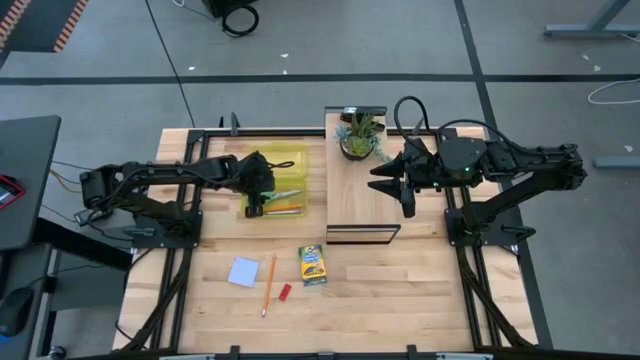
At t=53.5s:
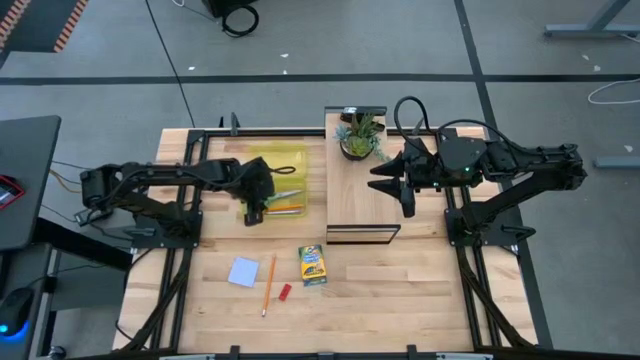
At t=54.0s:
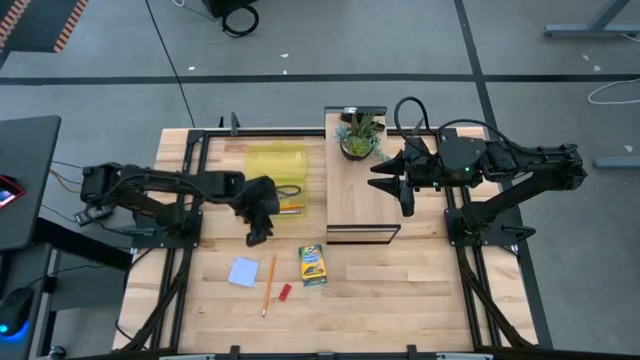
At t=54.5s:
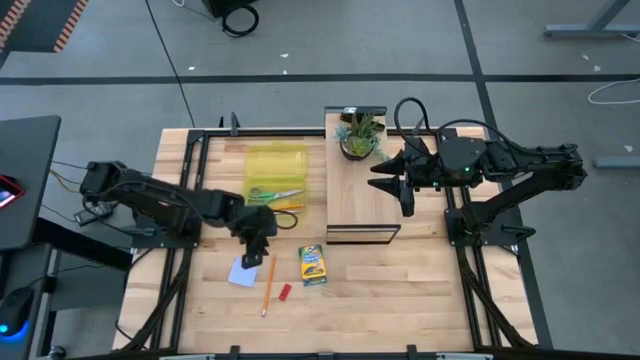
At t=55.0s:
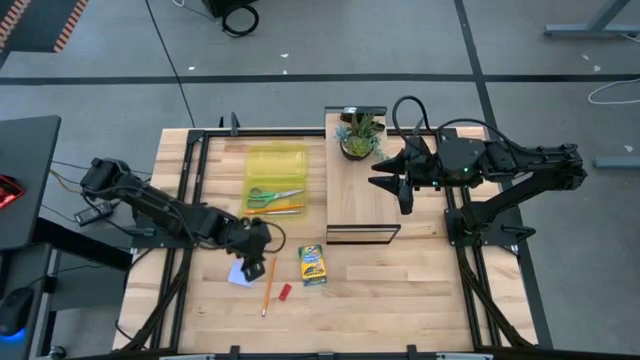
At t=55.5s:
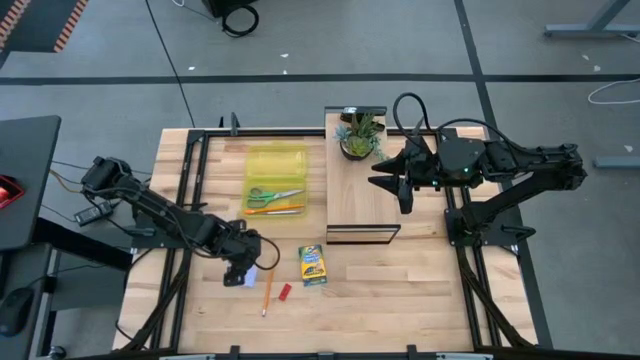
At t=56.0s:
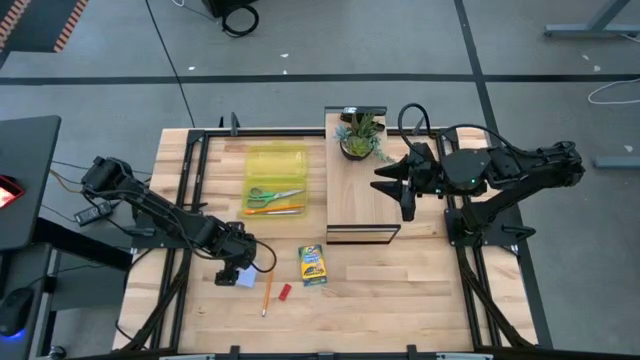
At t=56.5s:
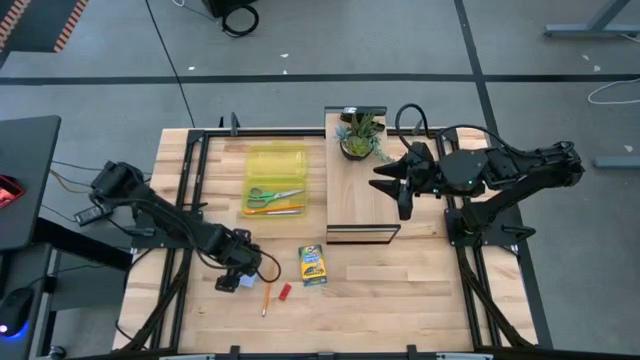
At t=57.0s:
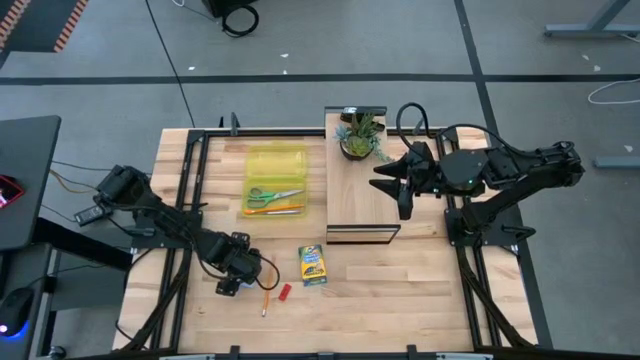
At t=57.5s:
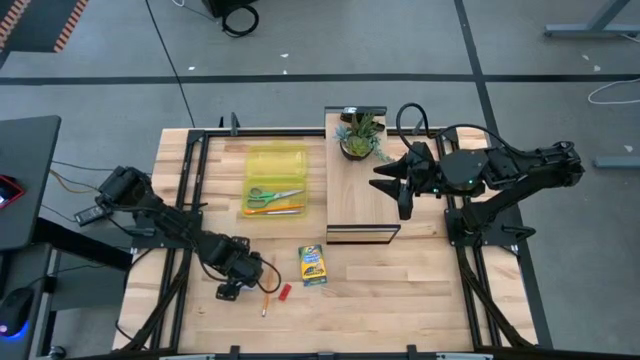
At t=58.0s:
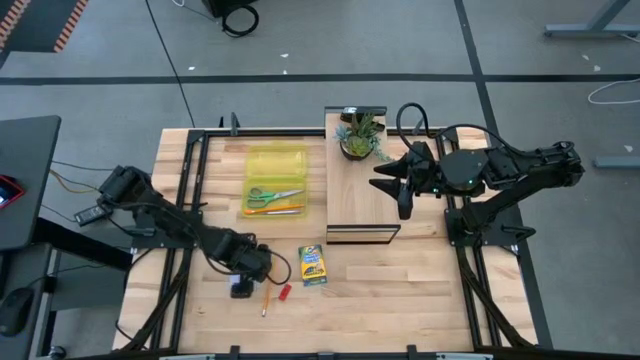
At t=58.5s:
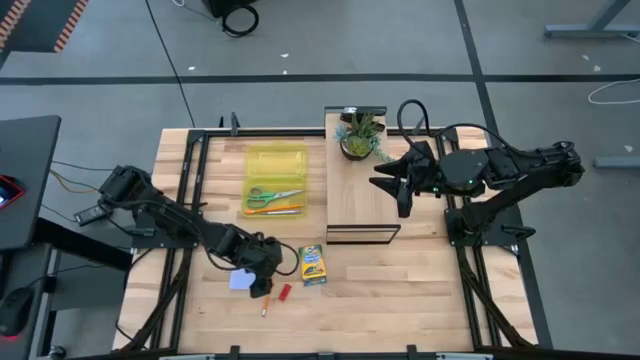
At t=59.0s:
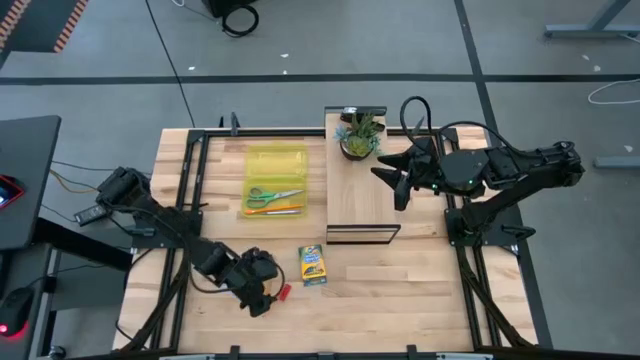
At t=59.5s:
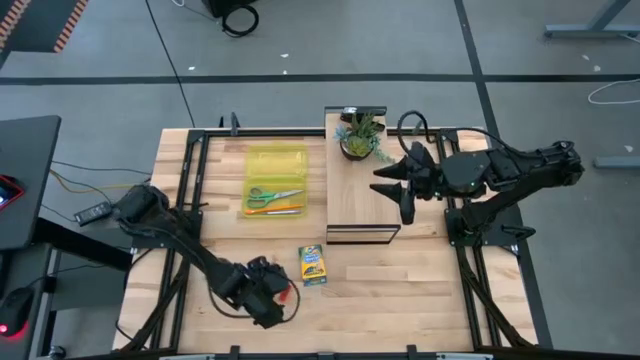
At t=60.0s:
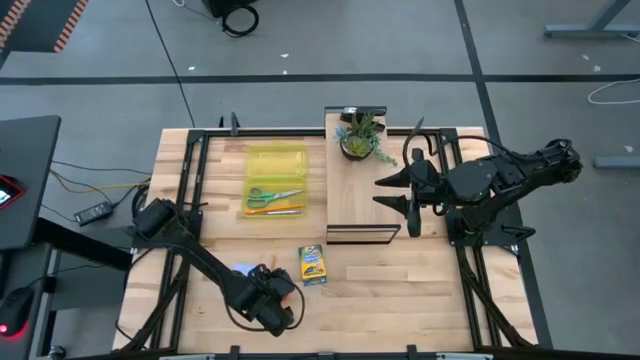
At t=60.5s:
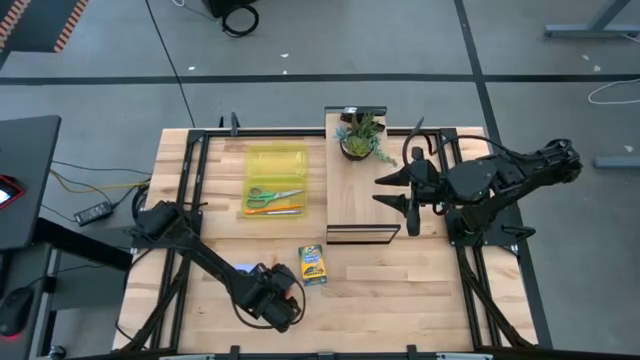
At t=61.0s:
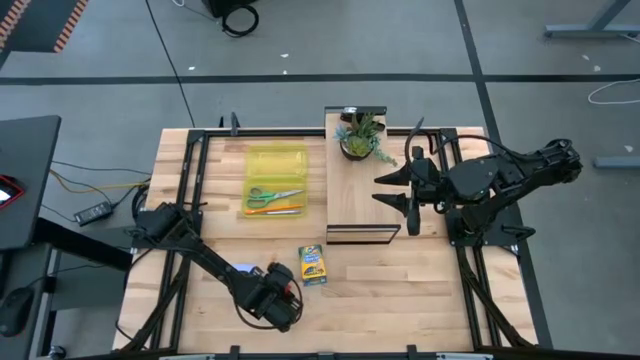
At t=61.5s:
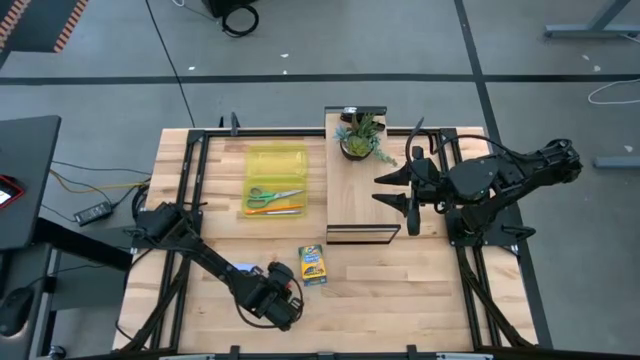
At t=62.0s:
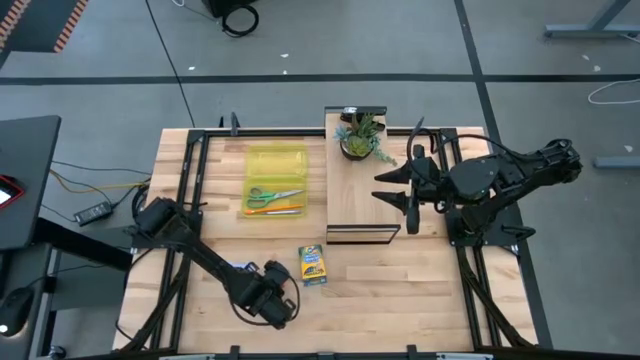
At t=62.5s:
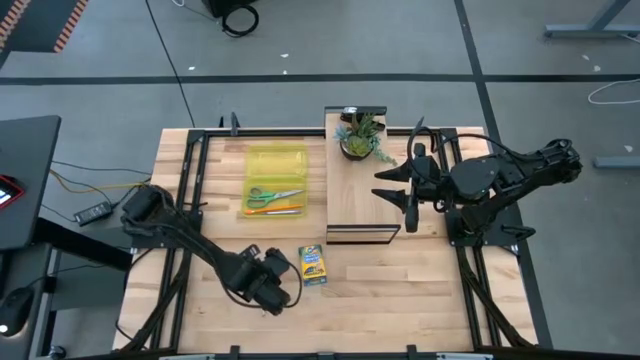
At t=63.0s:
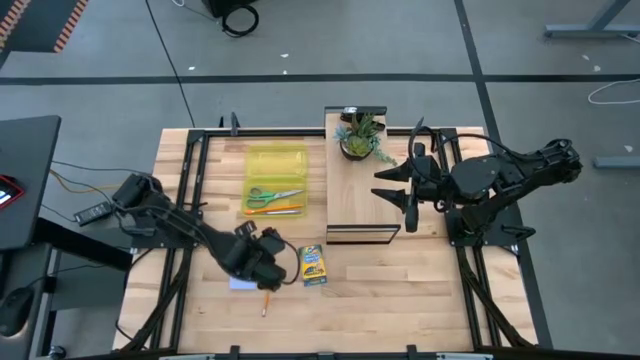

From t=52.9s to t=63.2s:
Task: Pack school essentials
Put the red eraser into the yellow supply box

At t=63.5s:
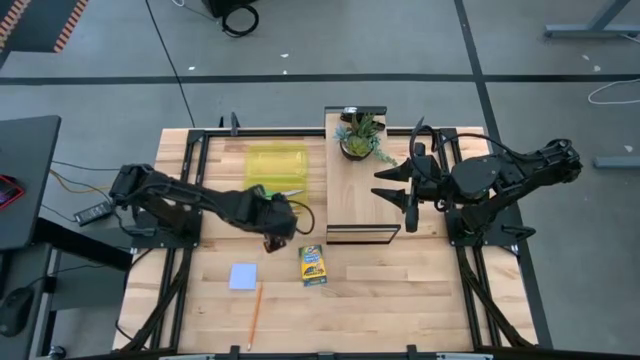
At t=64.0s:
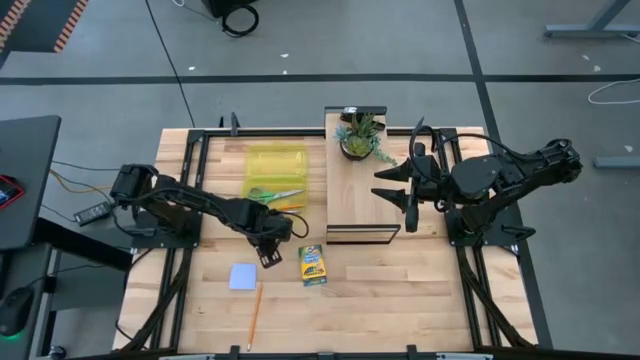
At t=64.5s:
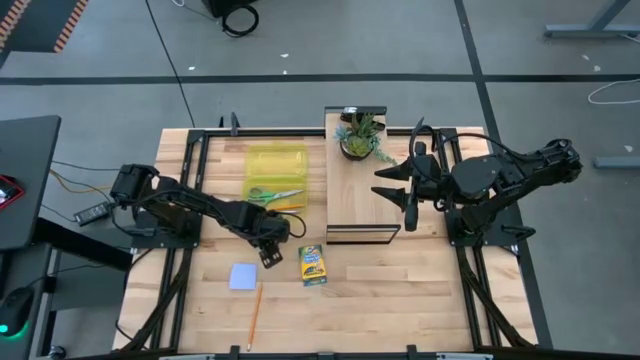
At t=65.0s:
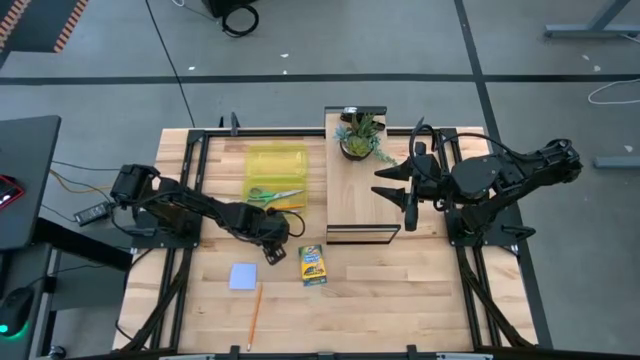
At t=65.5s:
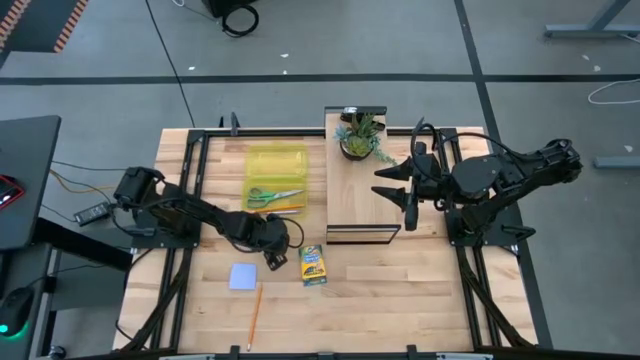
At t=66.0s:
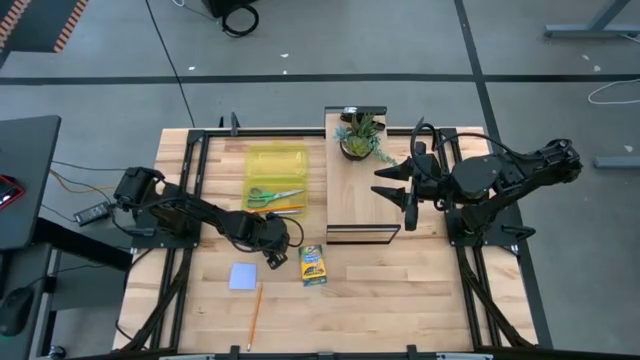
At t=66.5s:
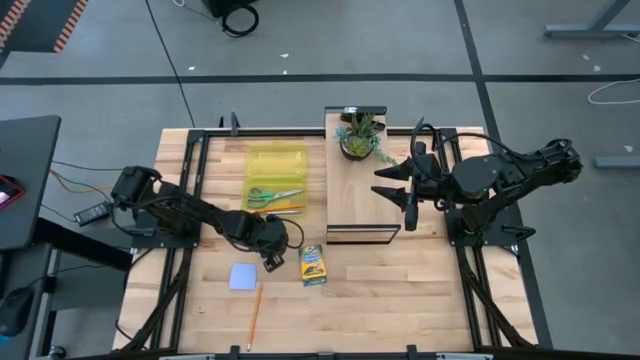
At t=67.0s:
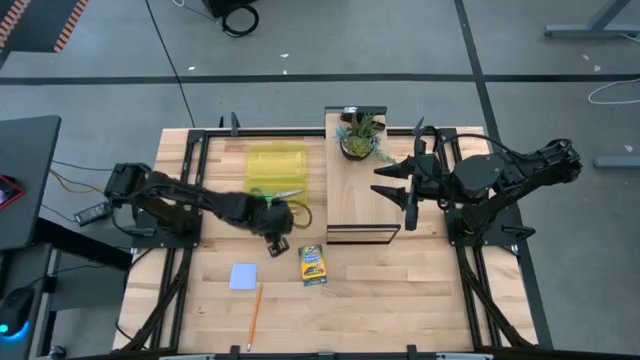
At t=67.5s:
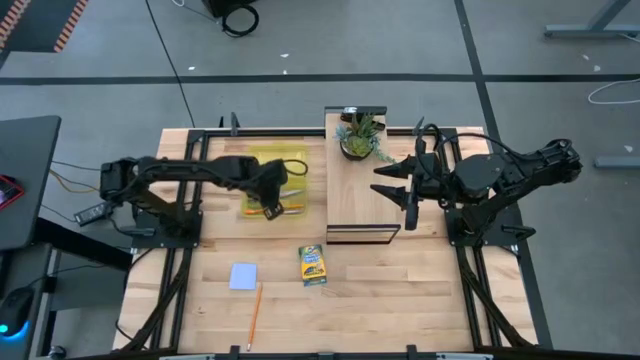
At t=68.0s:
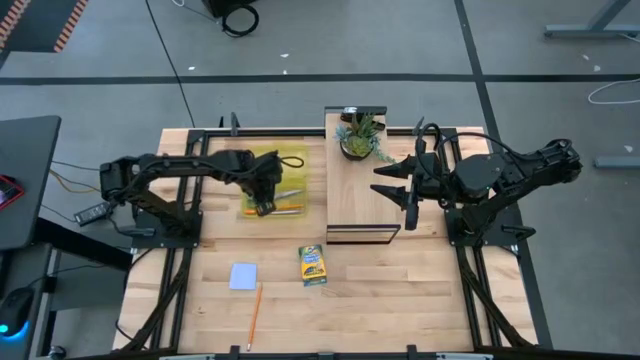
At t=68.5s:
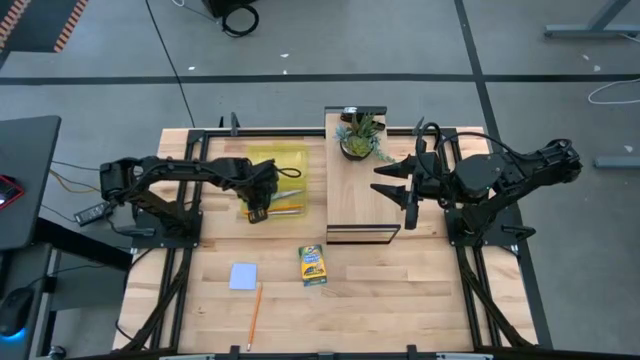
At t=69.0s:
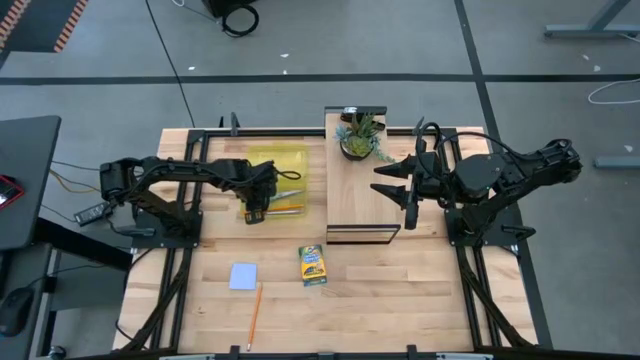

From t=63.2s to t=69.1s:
Put the red eraser into the yellow supply box

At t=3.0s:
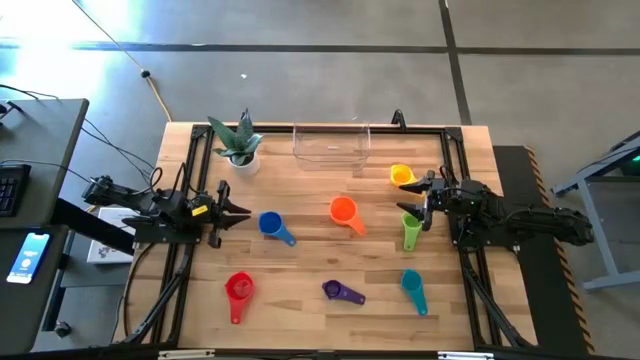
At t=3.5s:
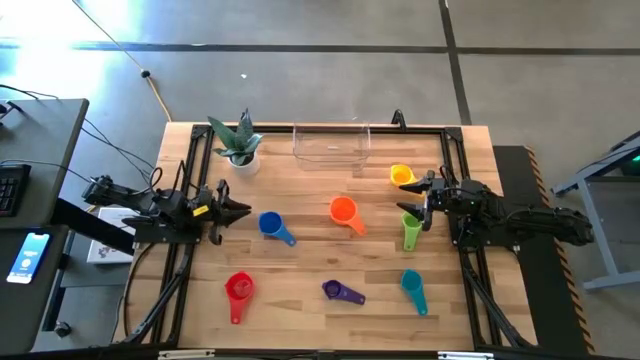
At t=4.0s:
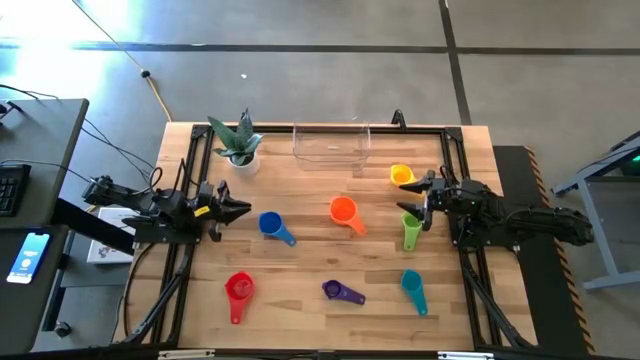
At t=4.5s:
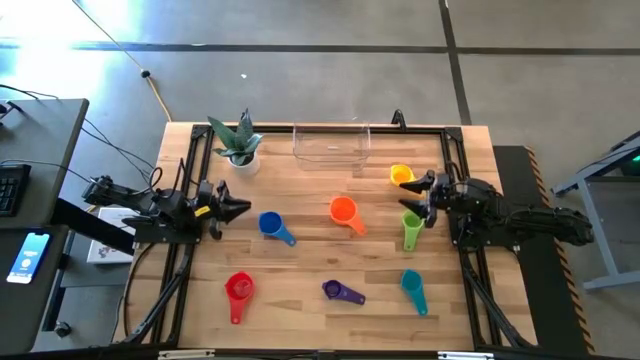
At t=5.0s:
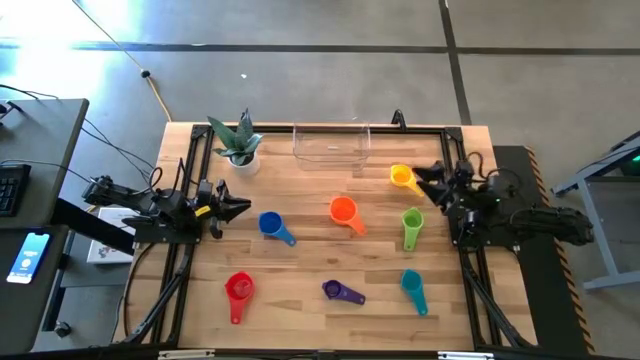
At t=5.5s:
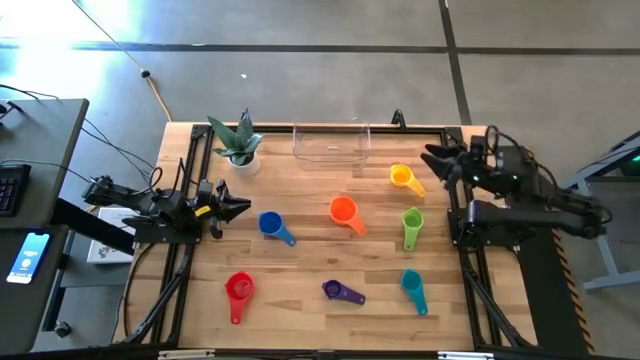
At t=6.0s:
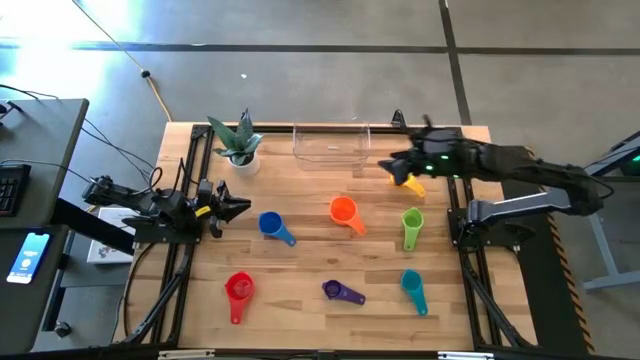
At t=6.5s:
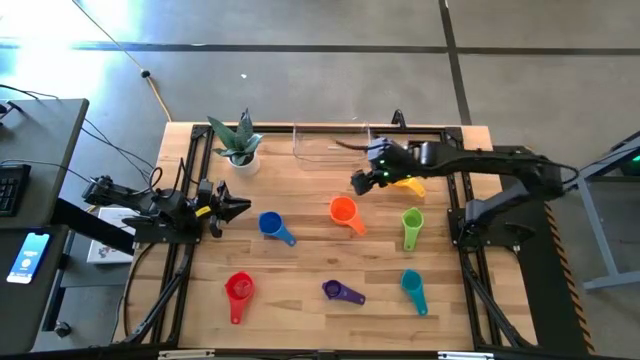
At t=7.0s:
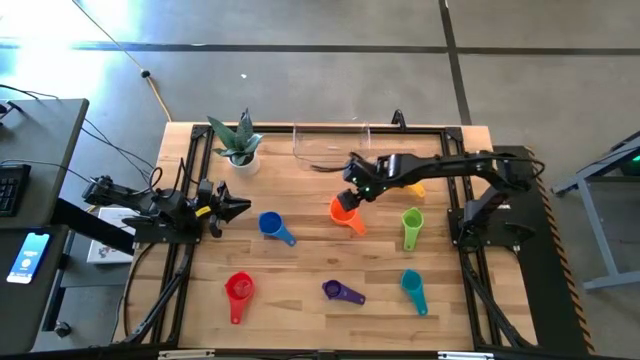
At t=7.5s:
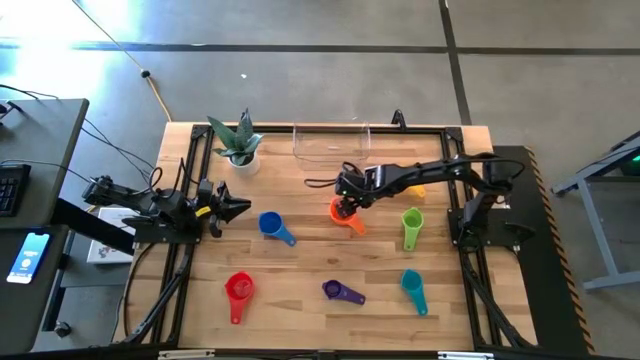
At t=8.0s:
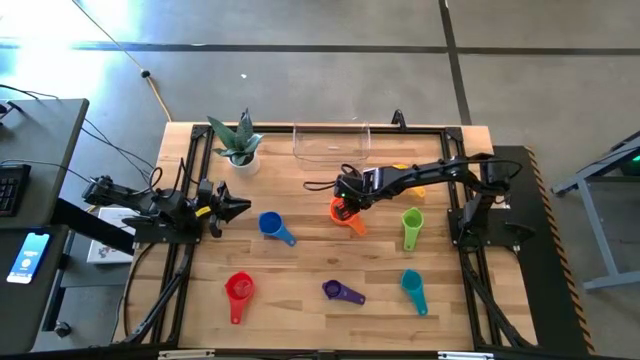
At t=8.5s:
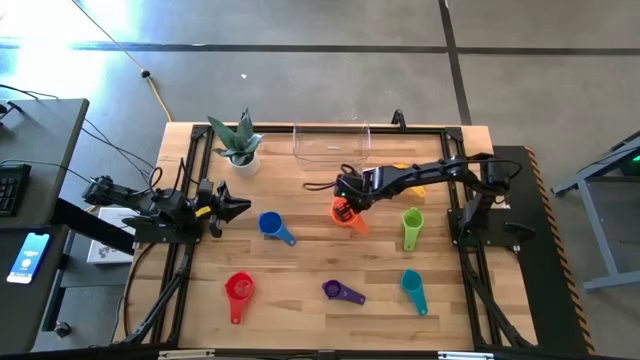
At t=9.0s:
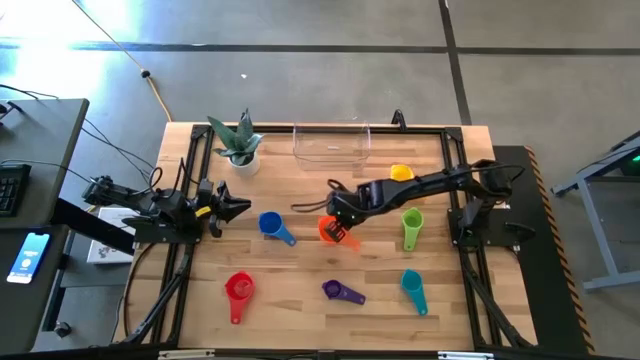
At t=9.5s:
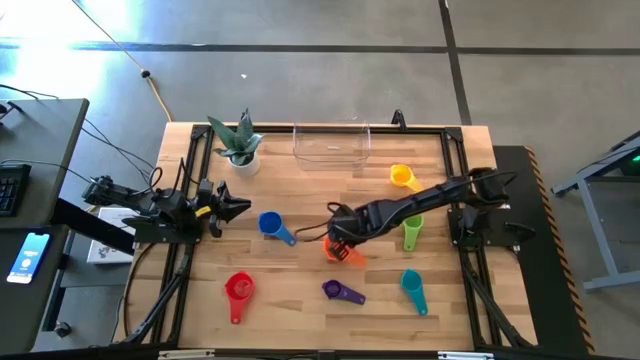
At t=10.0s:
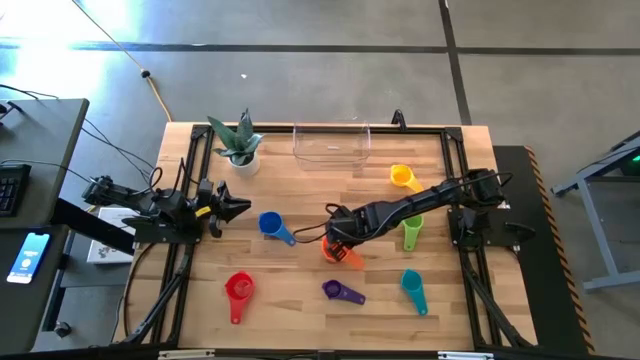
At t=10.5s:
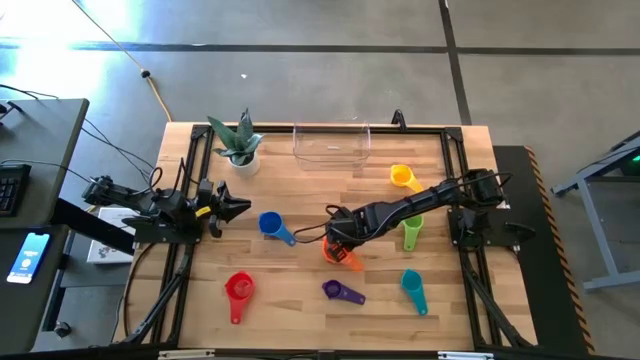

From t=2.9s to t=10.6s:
Task: Nest measuring cups in basket
Move the orange measuring cup to the middle of the table
